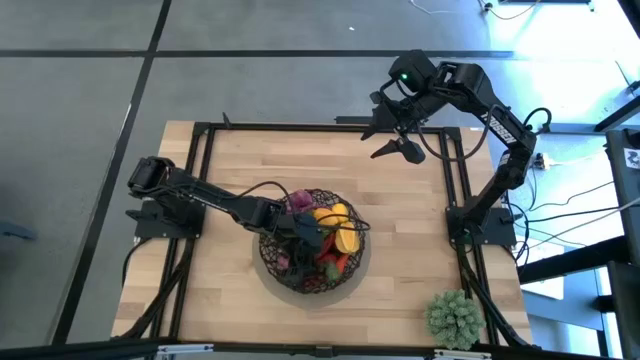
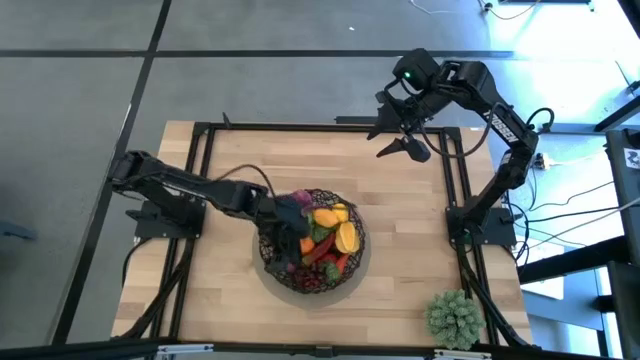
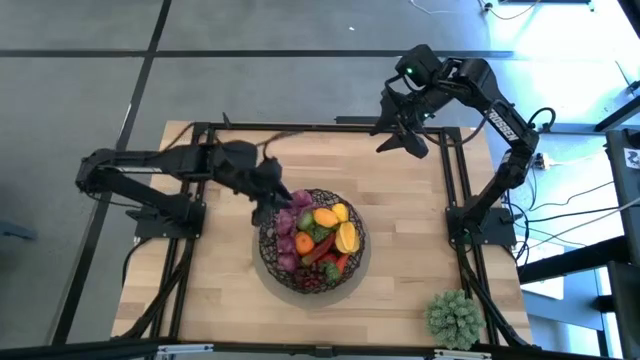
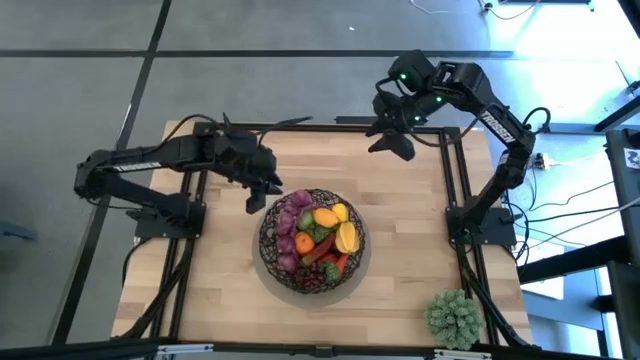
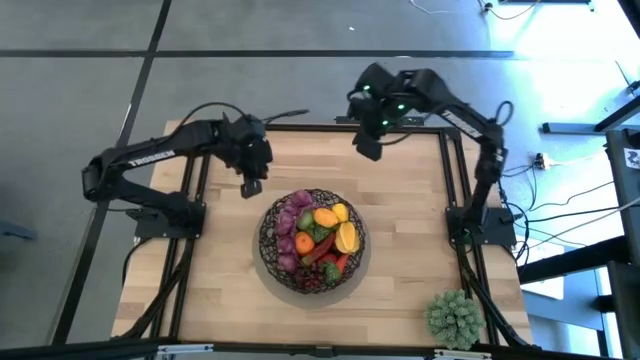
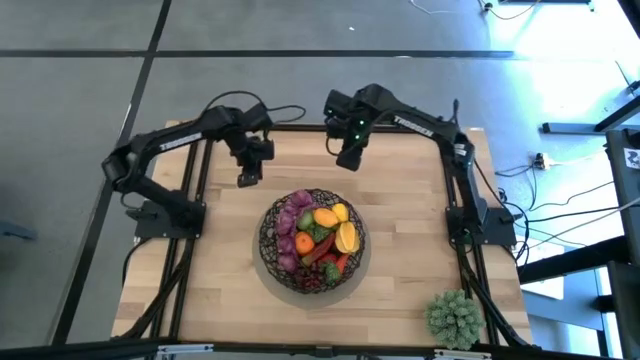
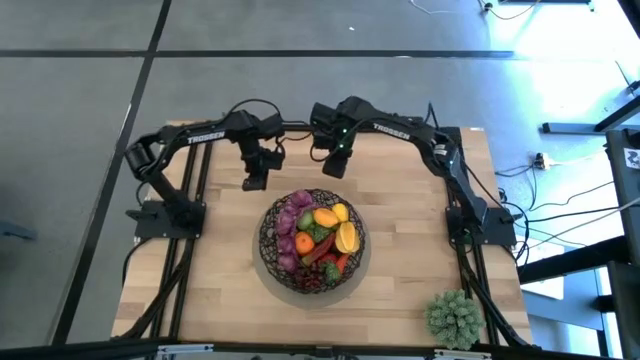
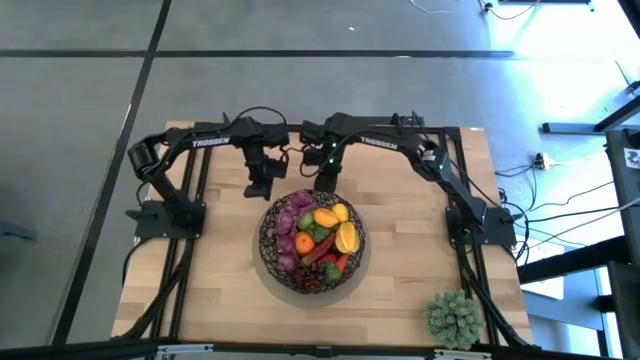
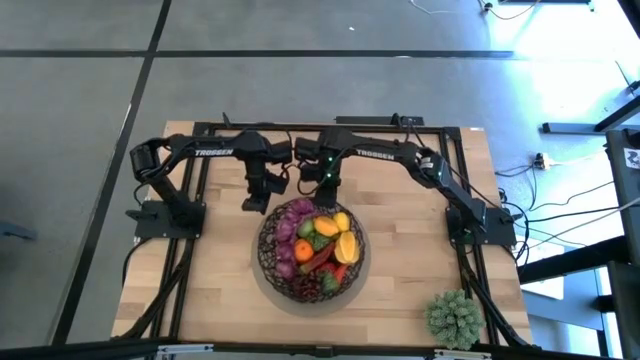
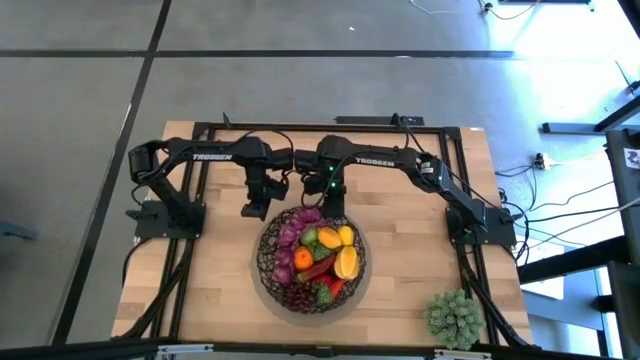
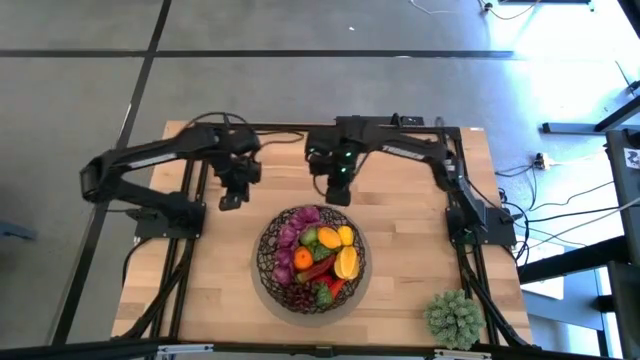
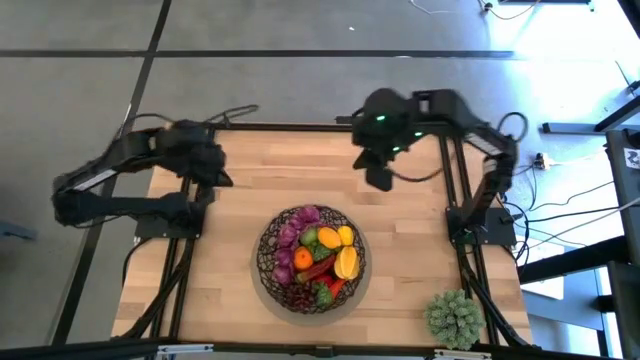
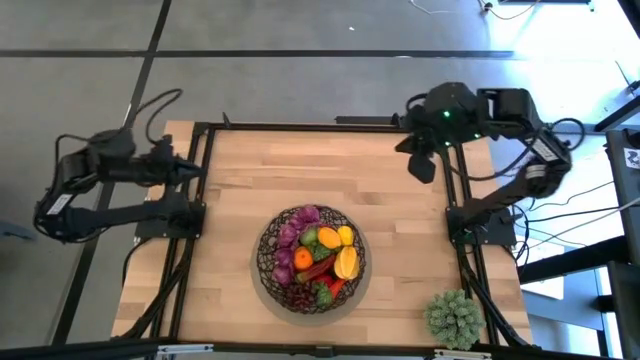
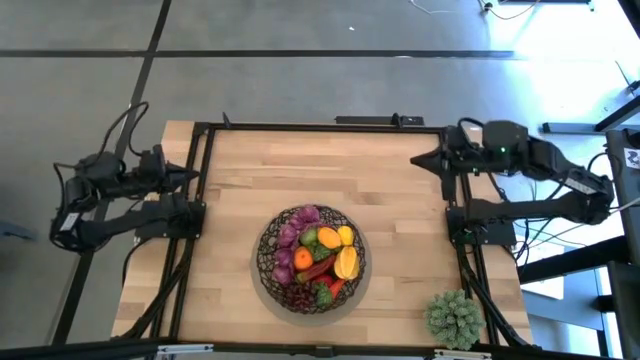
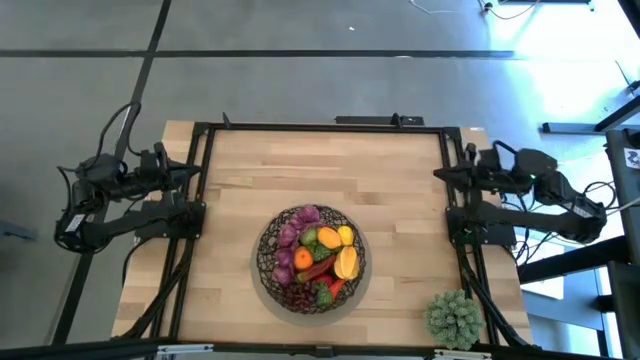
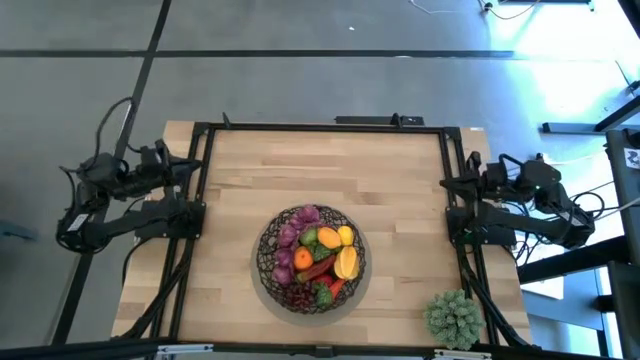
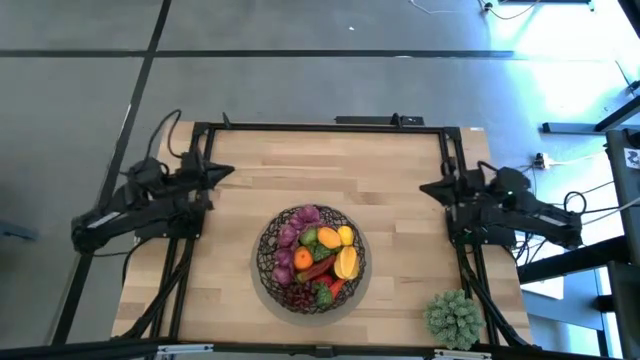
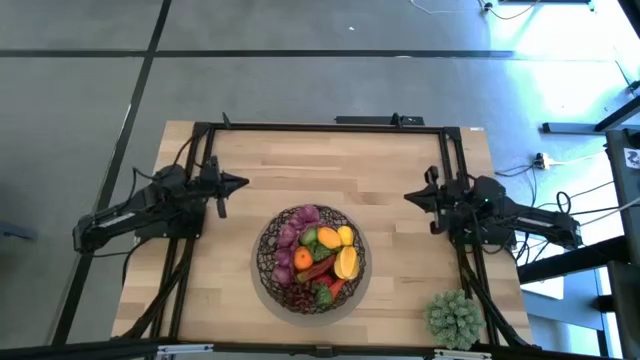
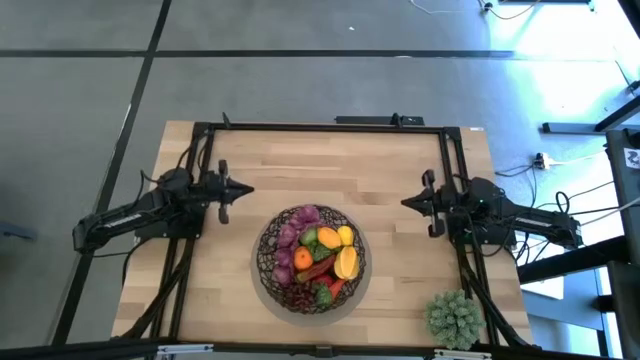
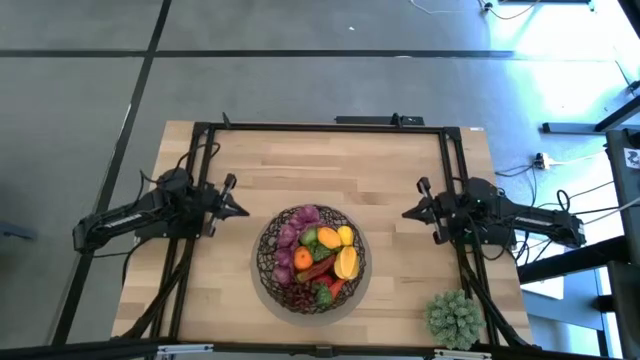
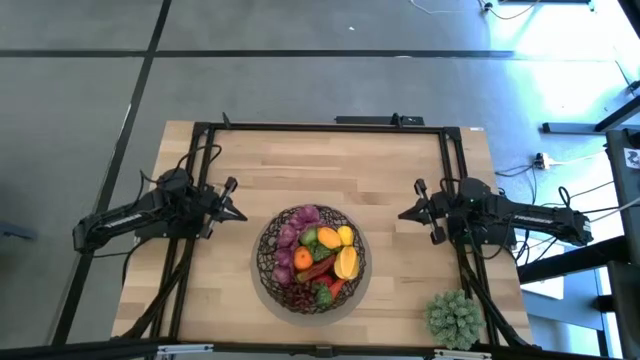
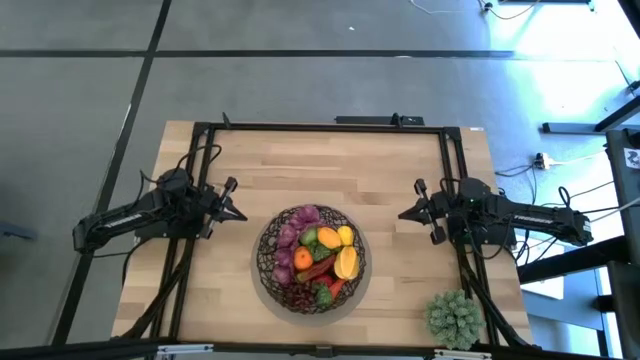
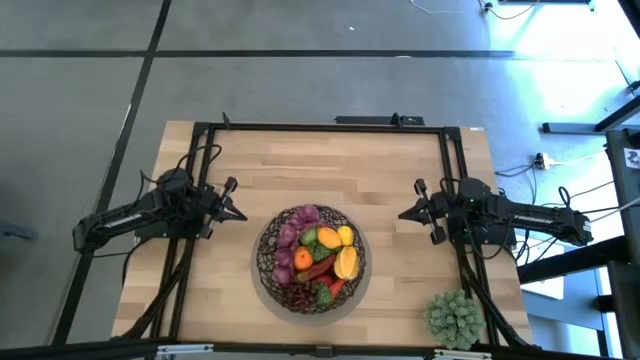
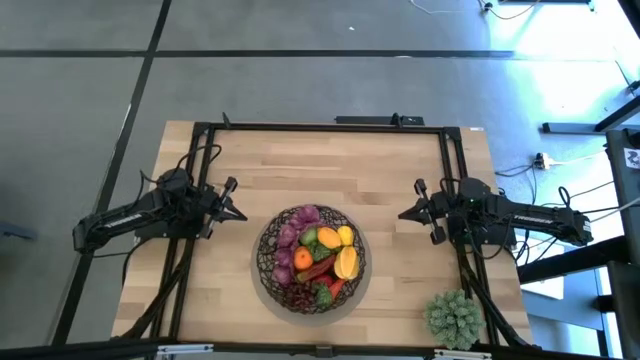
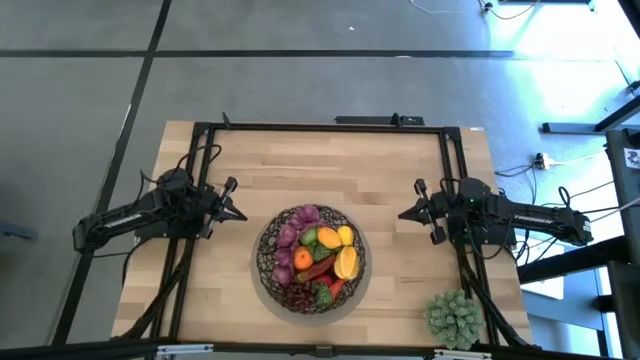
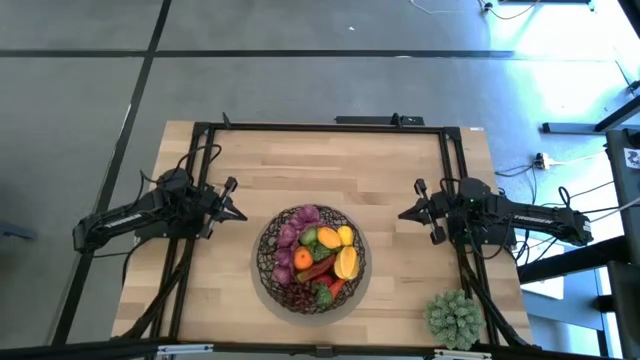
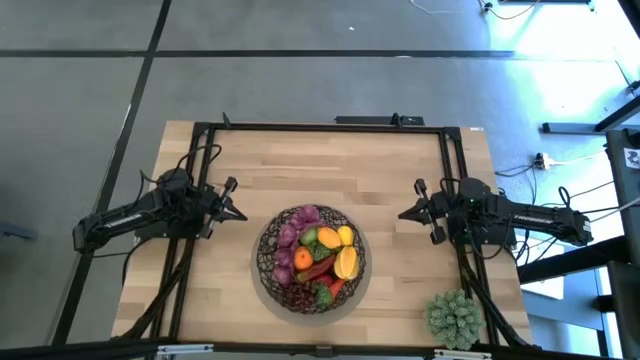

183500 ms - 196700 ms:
Task: Build produce basket
Return to Home Position

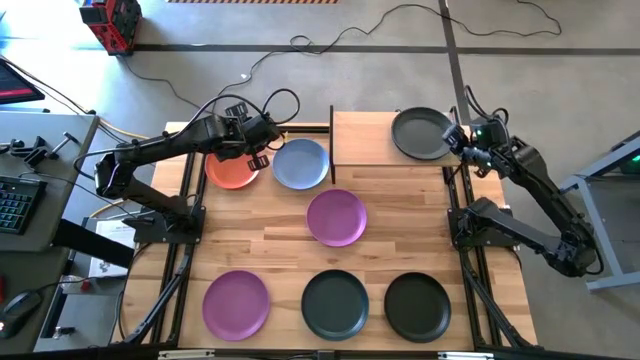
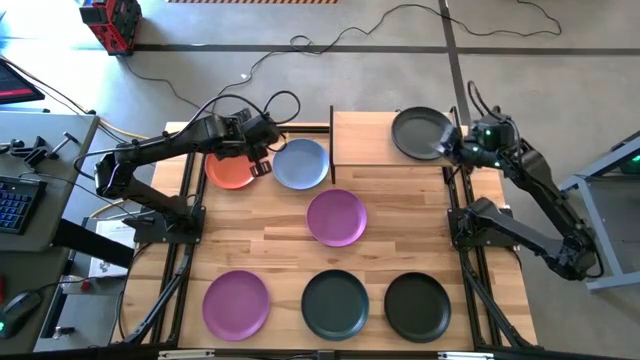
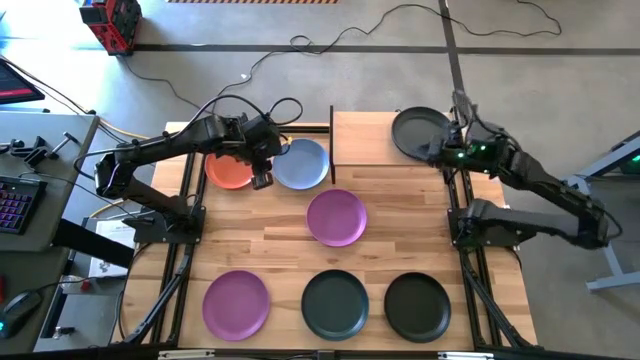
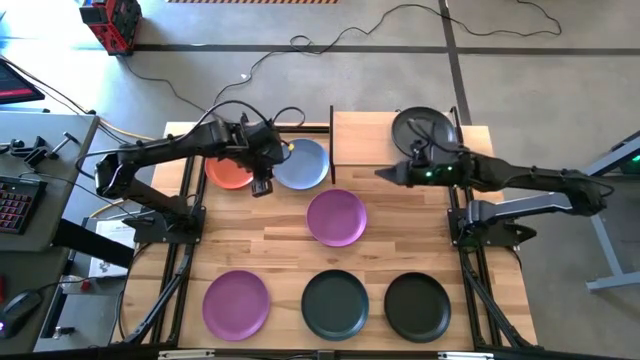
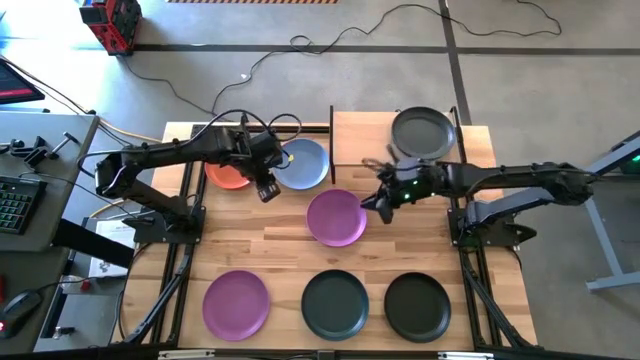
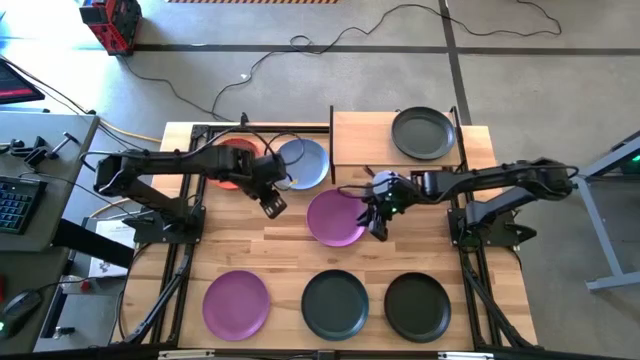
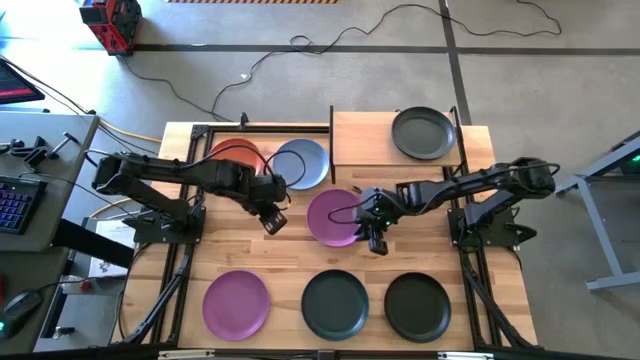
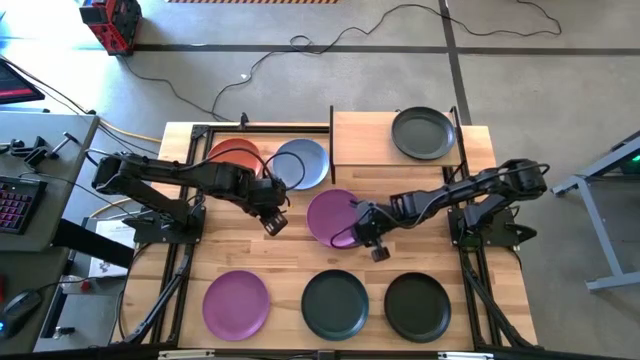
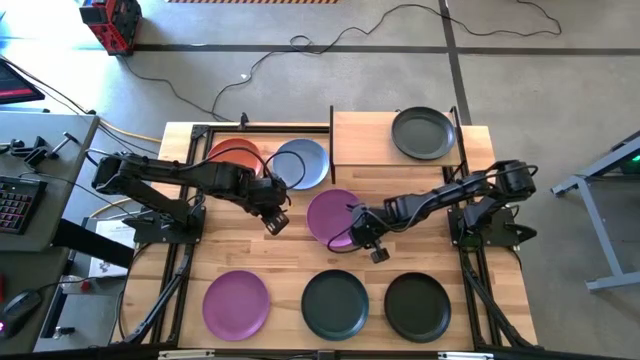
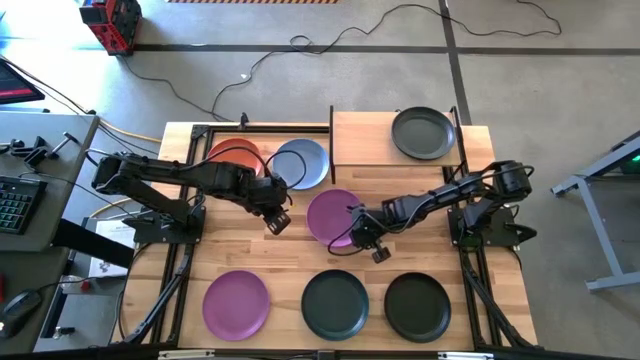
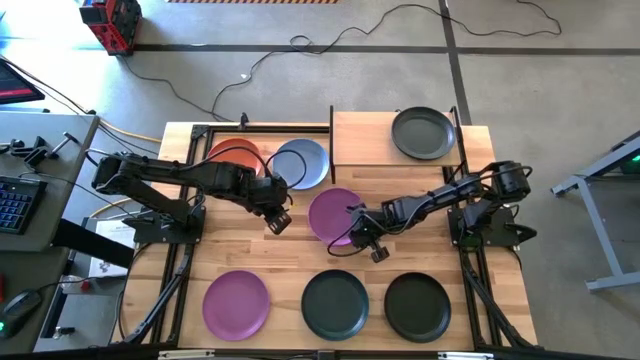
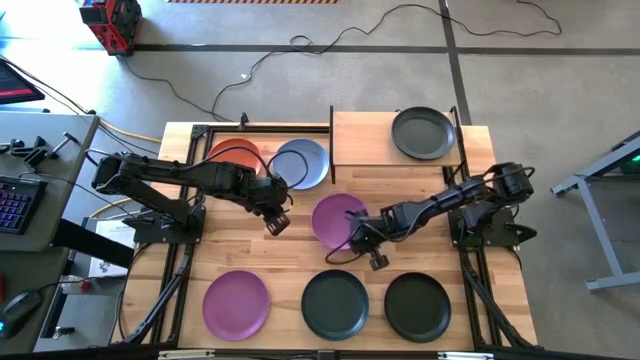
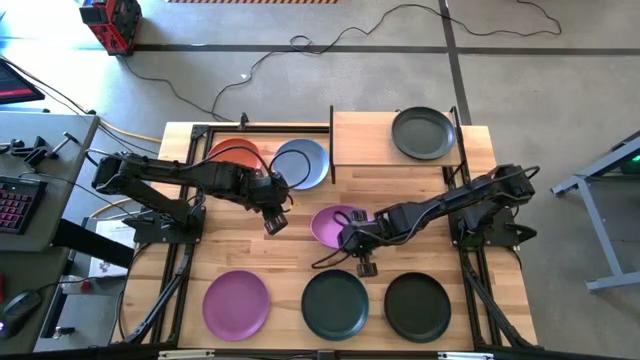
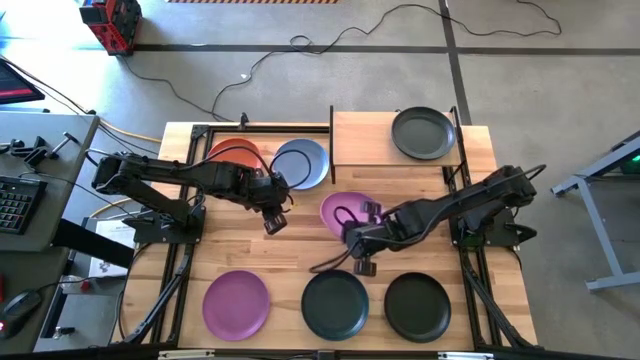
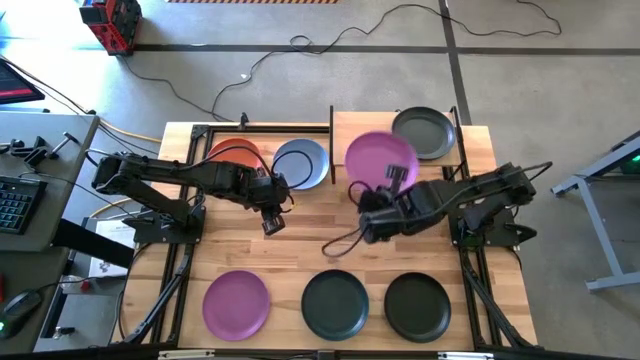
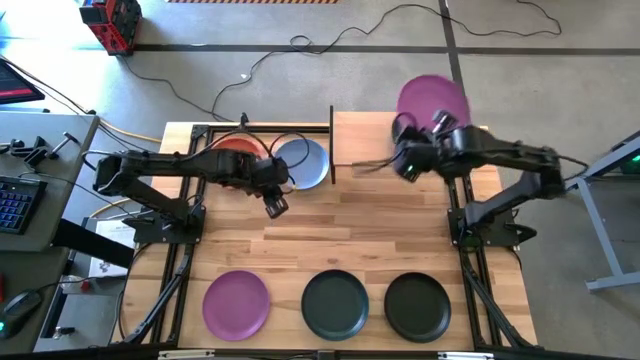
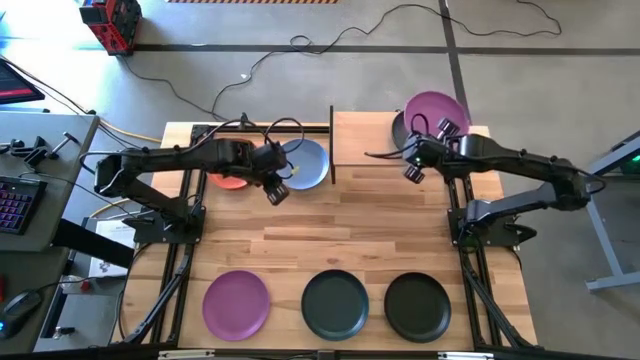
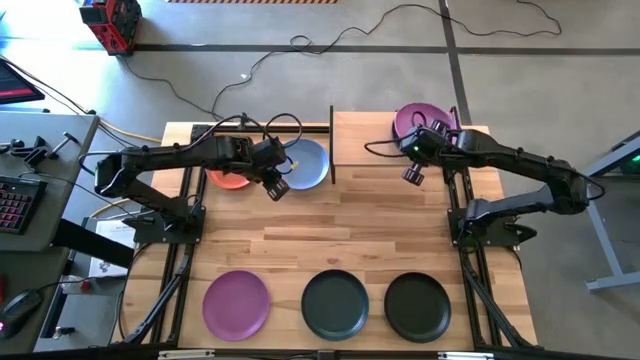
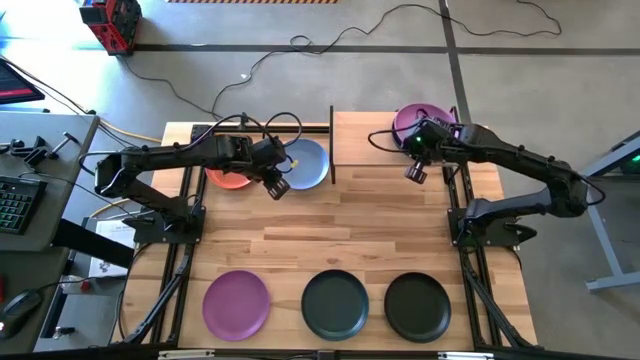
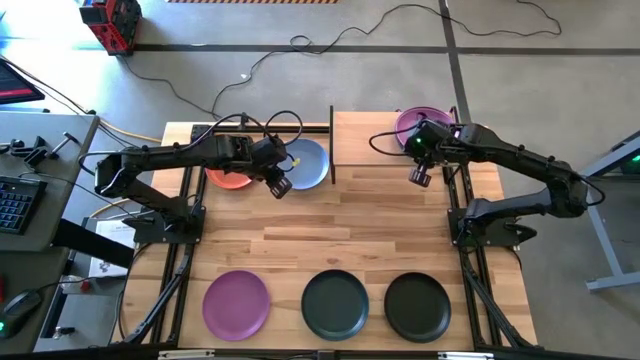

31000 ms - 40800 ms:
Task: Place and stack plates onto a shelf
Stack the top violet plate on top of the black plate on the shelf
